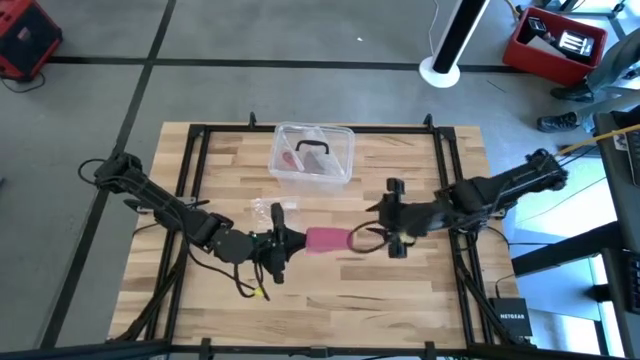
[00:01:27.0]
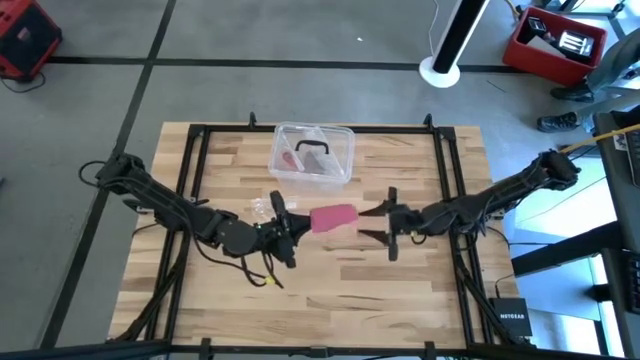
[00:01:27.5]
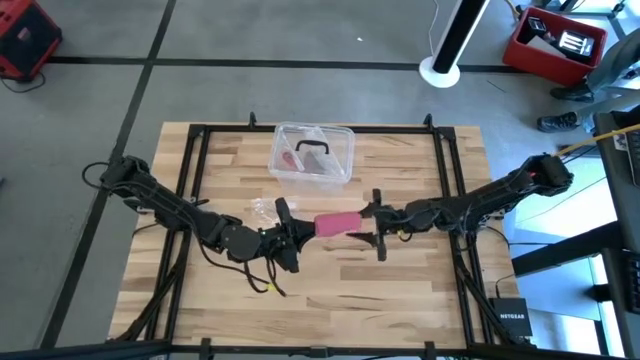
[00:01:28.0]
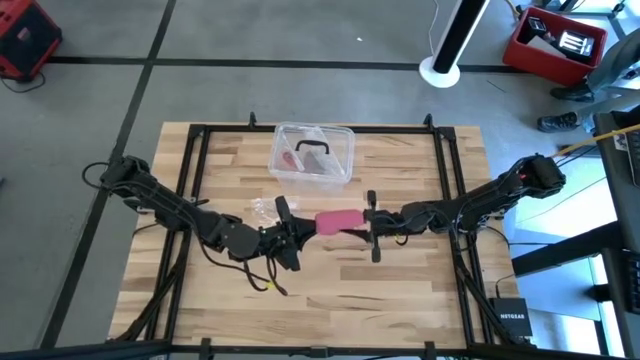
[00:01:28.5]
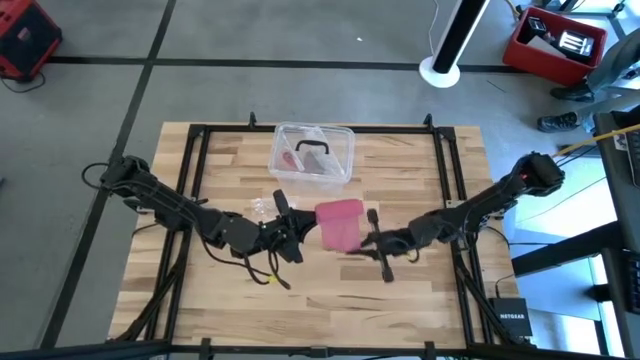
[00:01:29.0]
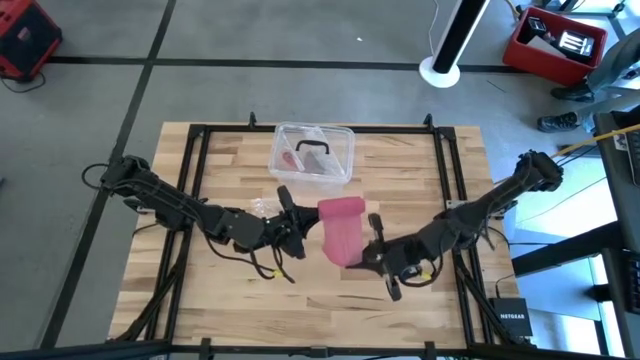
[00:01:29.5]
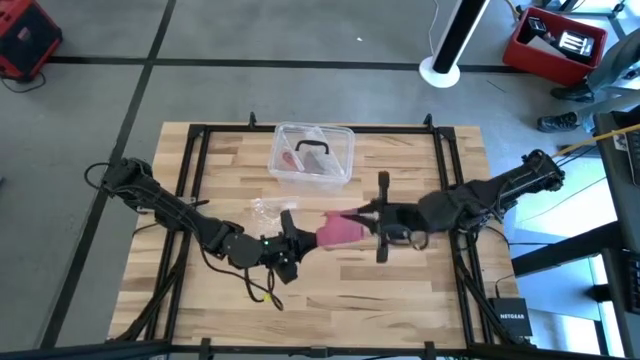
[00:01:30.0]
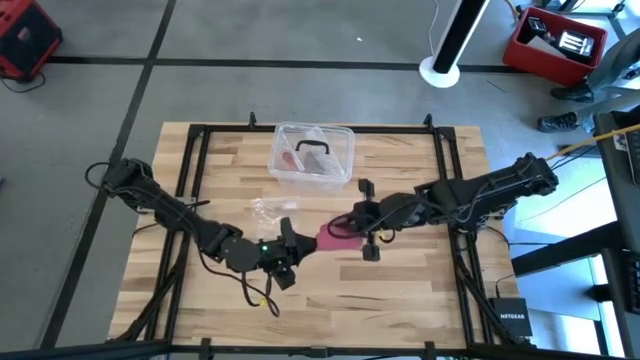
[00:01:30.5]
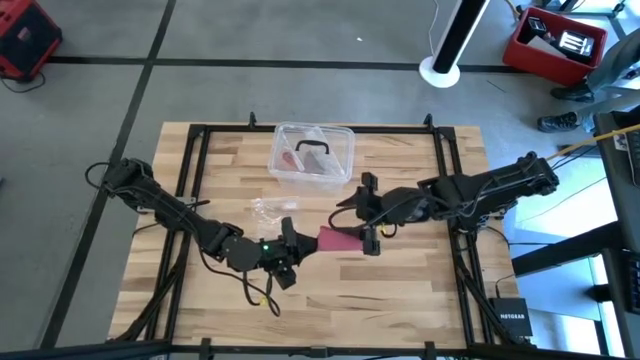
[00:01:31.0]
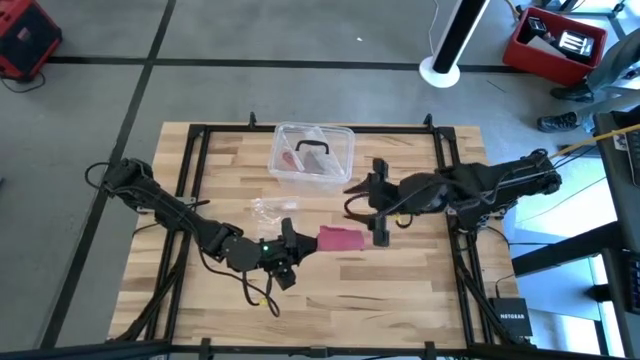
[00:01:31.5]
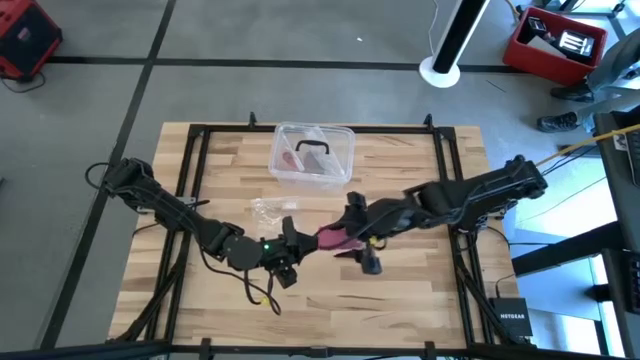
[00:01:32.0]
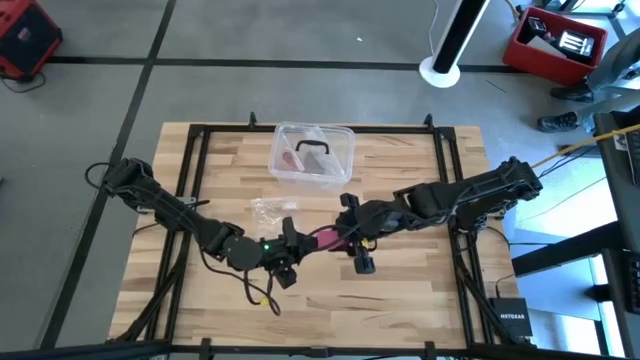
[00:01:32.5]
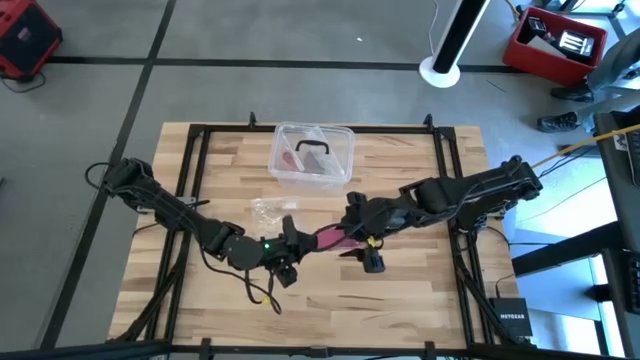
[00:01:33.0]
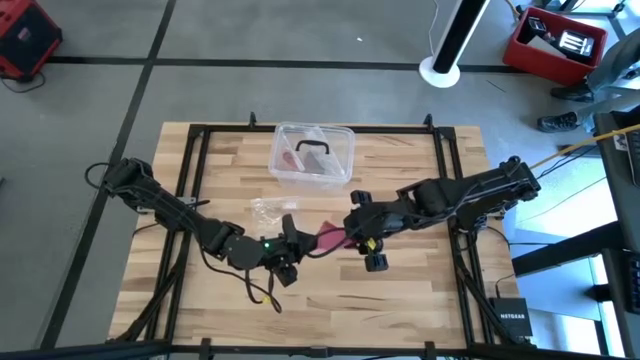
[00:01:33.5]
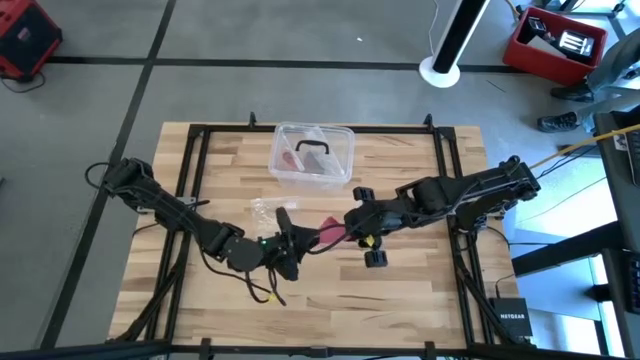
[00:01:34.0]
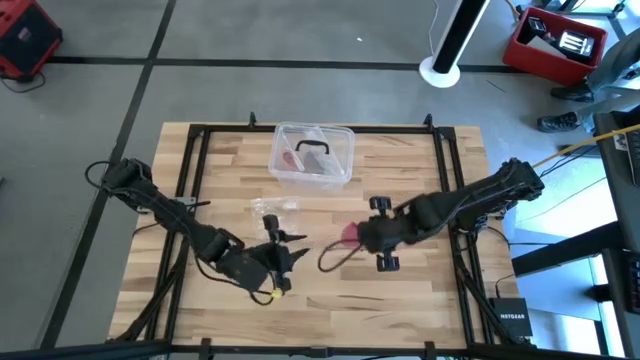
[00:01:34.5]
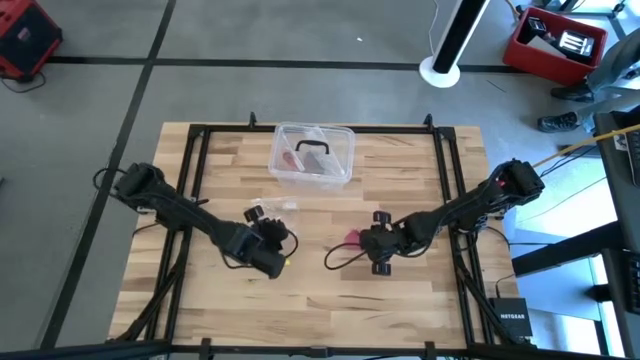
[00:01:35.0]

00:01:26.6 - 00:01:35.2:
Task: Roll bandage
Roll the pink bandage

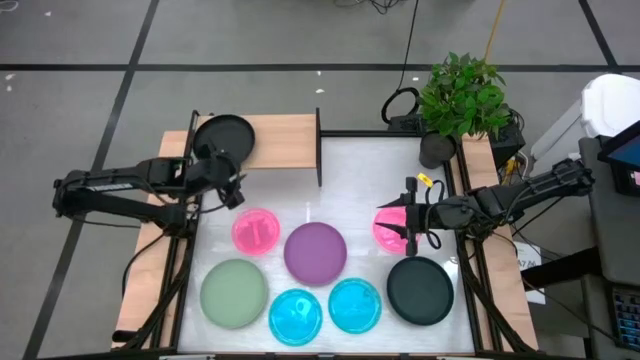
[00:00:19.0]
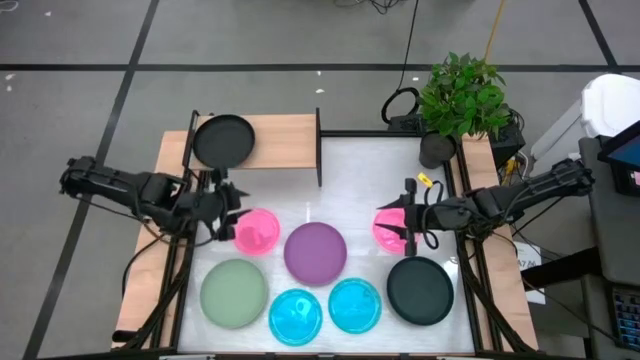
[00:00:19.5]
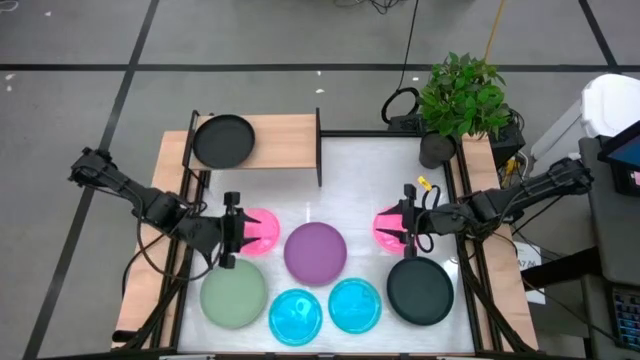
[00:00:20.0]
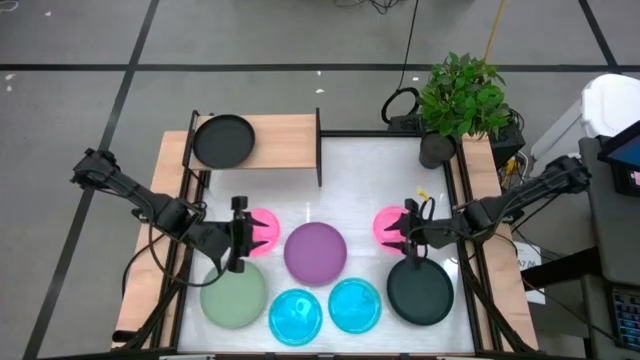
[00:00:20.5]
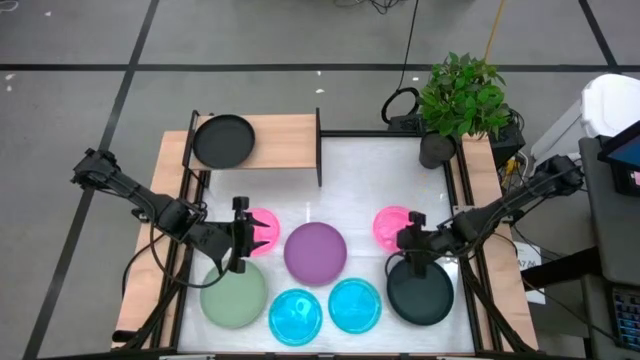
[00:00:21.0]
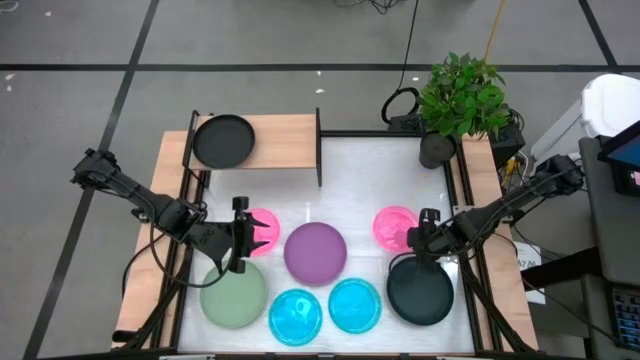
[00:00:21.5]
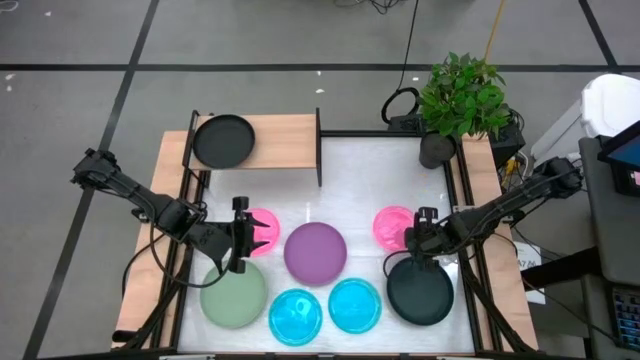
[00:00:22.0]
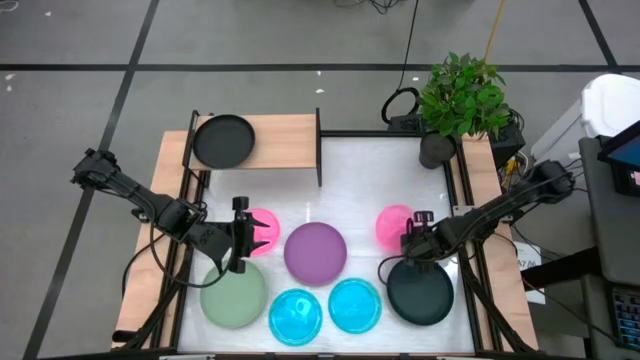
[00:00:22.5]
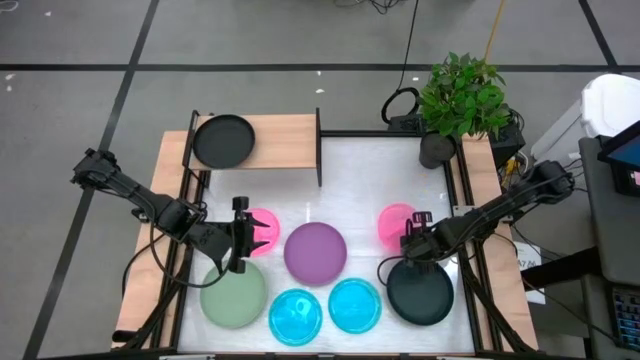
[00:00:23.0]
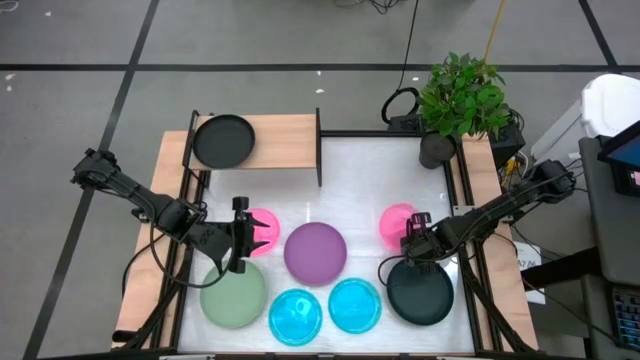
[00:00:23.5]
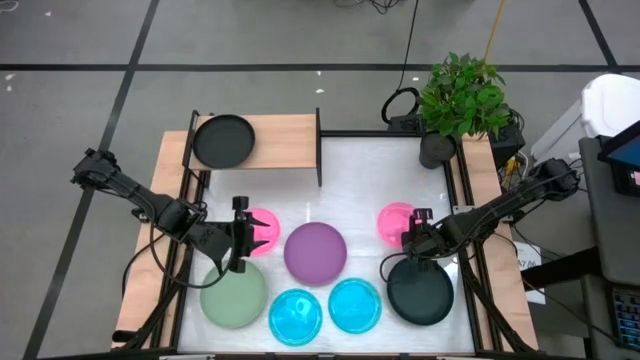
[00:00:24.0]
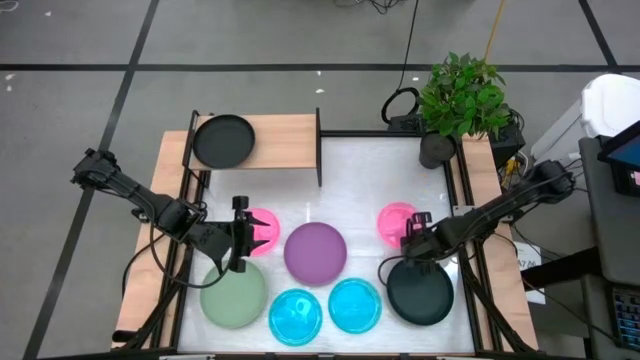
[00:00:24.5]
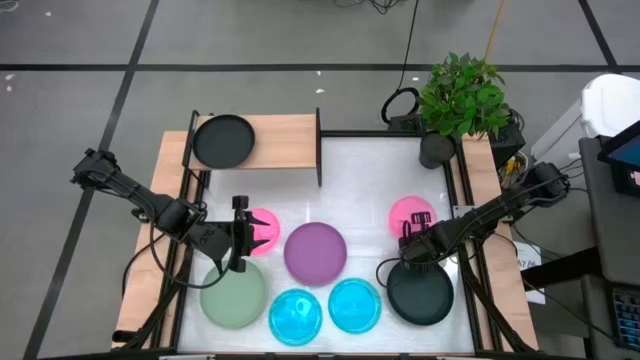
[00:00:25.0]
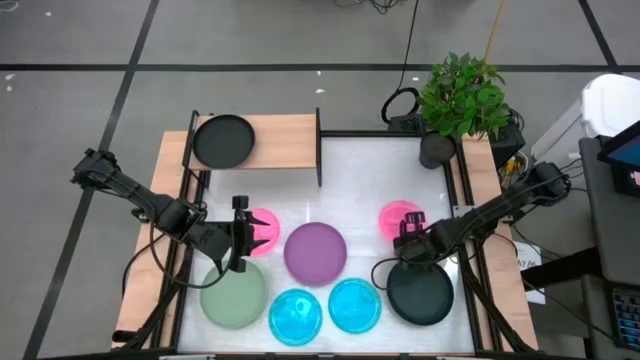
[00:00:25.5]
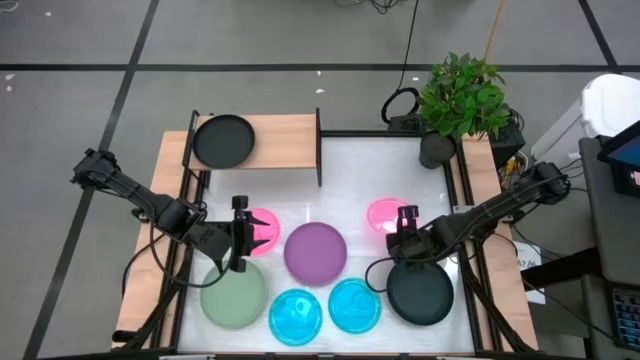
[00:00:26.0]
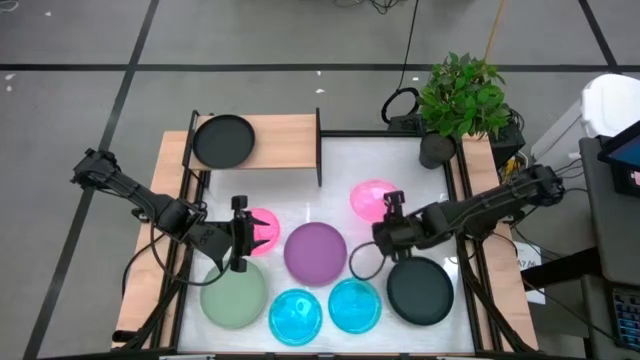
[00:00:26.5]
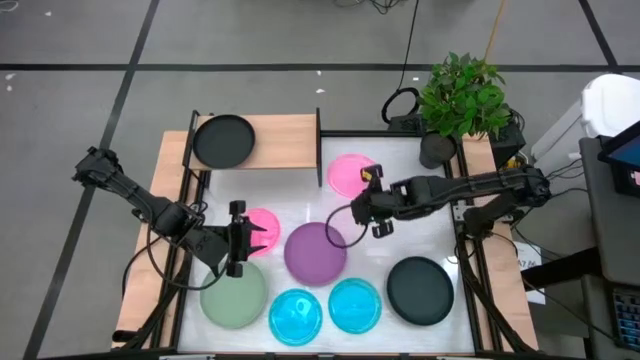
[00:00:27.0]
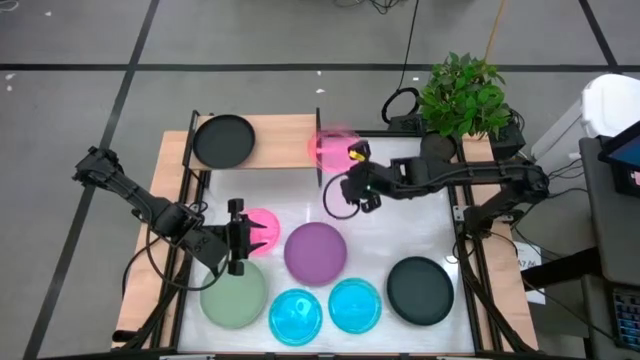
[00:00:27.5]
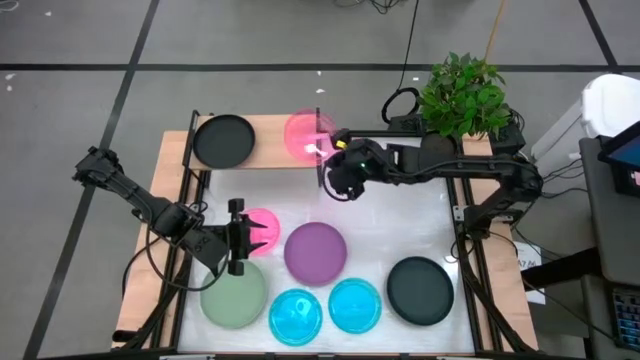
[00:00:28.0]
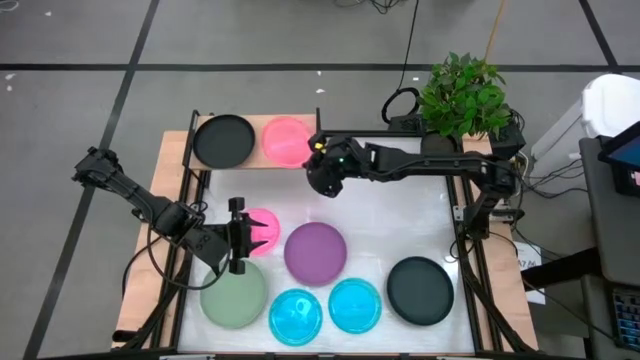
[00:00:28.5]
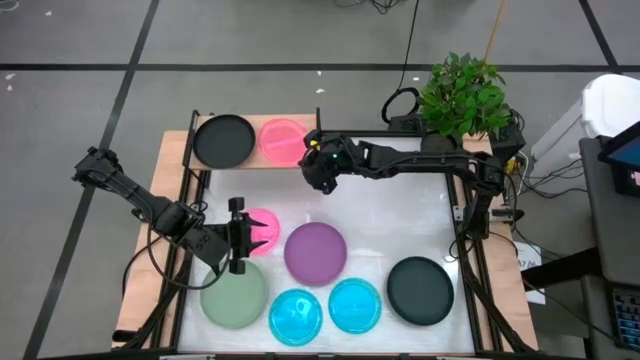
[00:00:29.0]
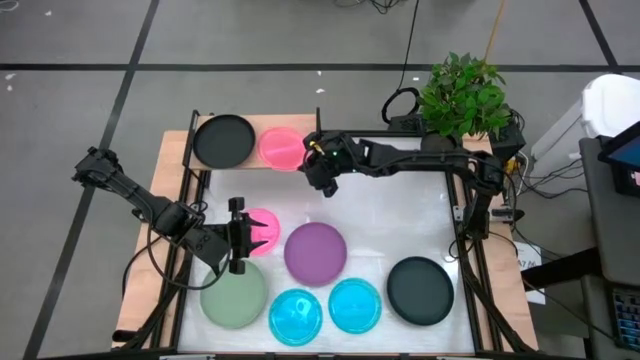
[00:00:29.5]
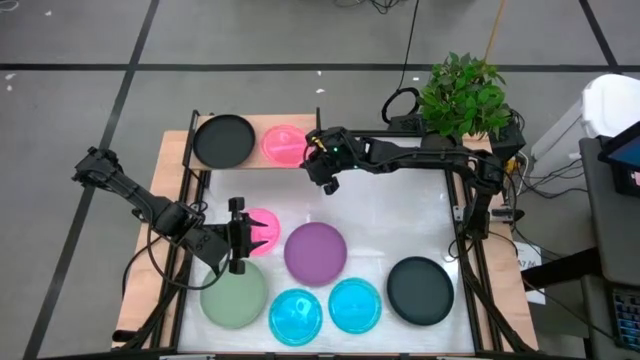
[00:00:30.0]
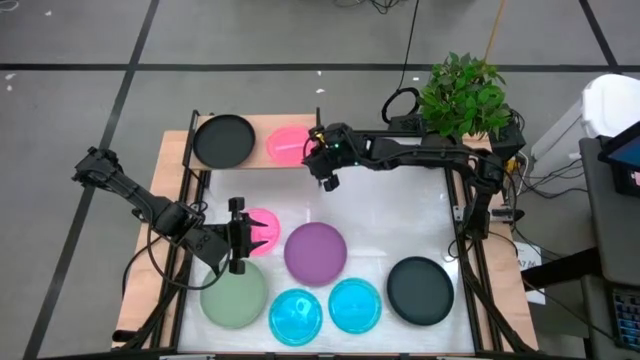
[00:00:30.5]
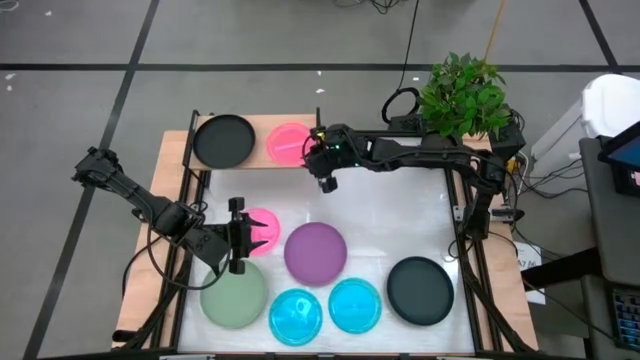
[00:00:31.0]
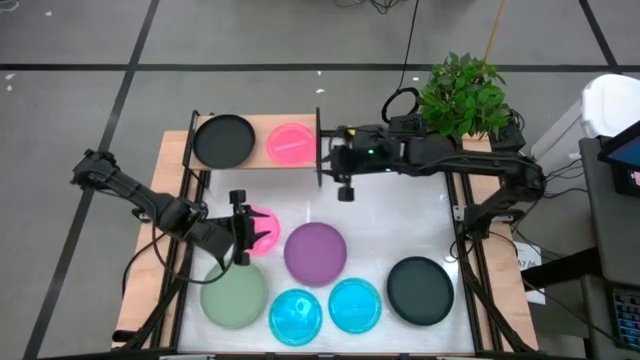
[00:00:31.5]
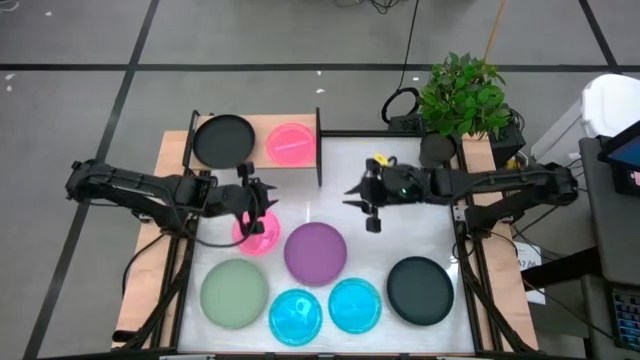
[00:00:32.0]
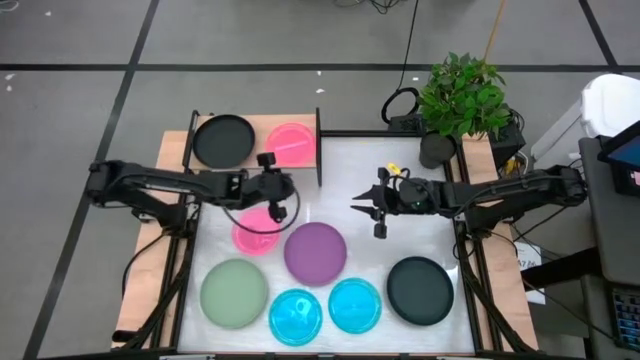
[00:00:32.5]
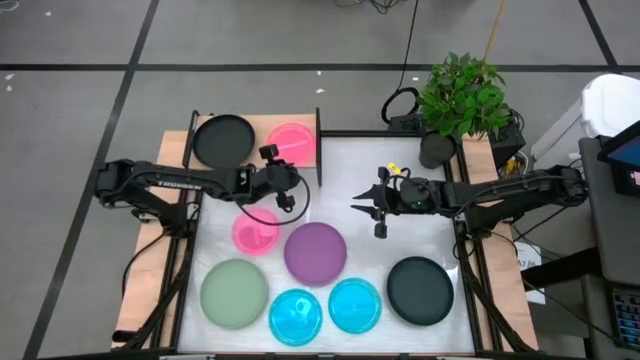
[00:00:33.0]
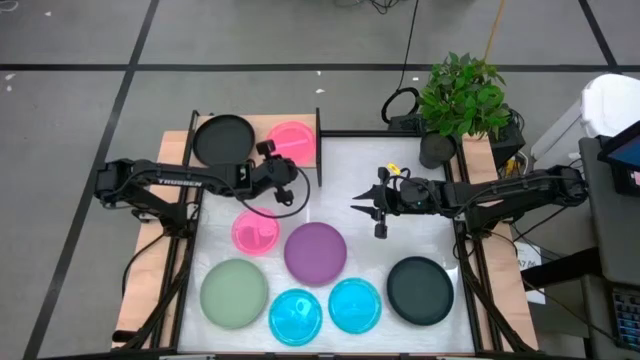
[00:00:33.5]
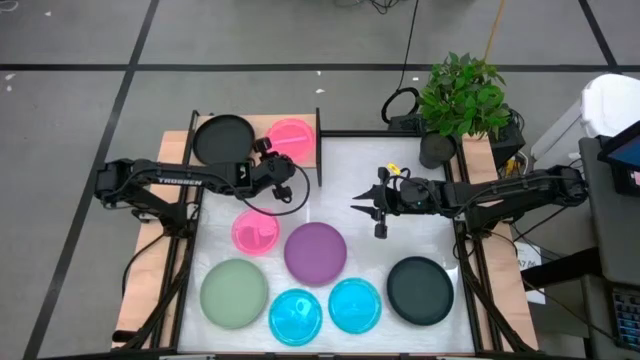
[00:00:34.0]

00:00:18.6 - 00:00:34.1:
Task: Place and stack plates onto a shelf
Put the right pink transparent plate on the shelf
